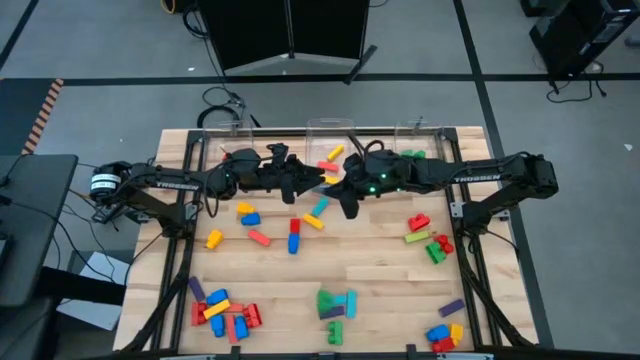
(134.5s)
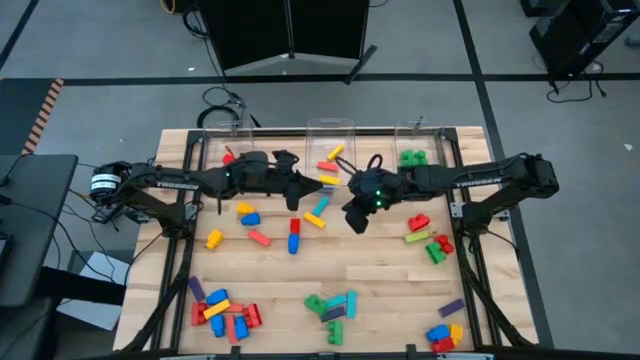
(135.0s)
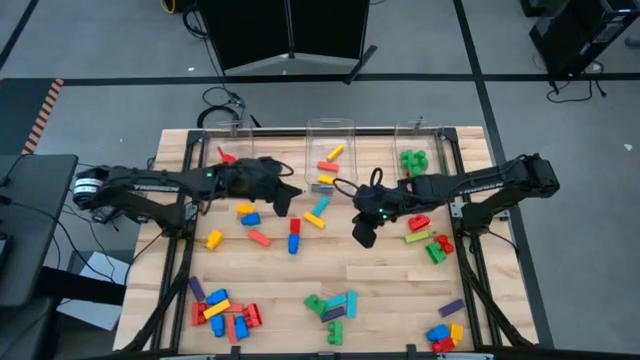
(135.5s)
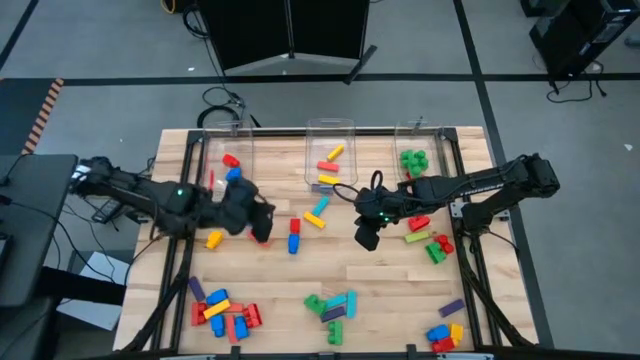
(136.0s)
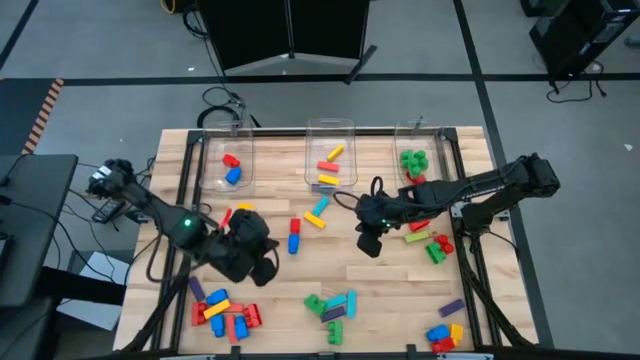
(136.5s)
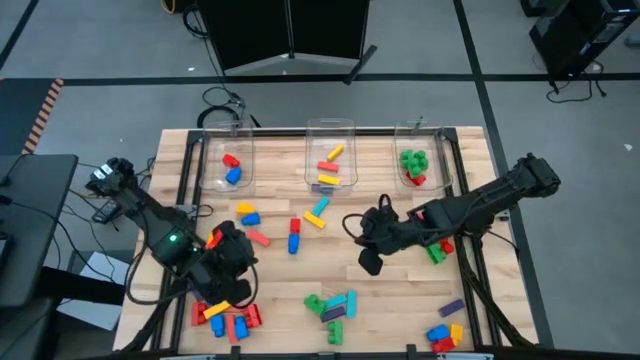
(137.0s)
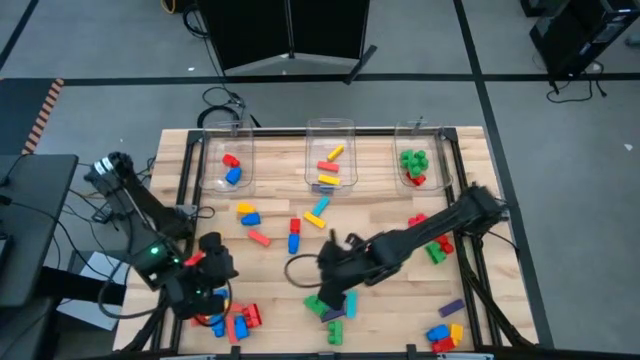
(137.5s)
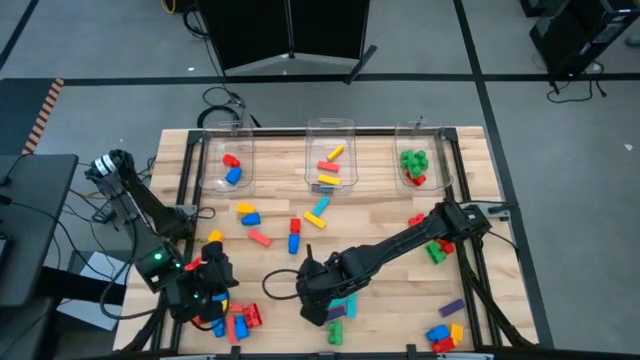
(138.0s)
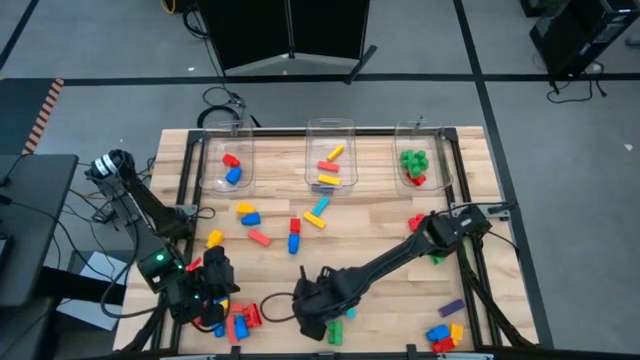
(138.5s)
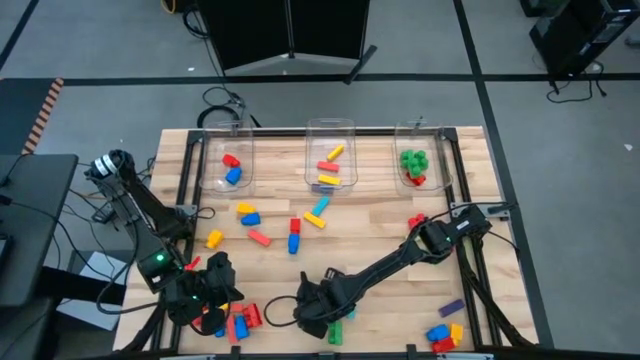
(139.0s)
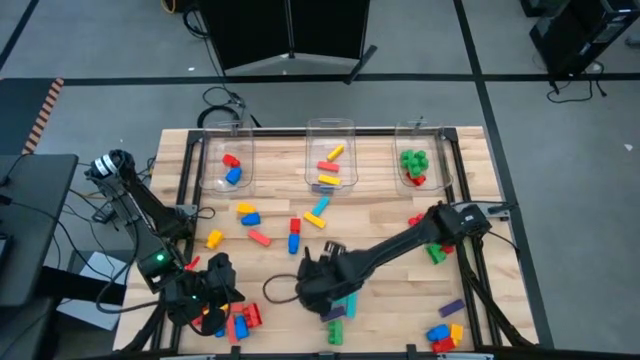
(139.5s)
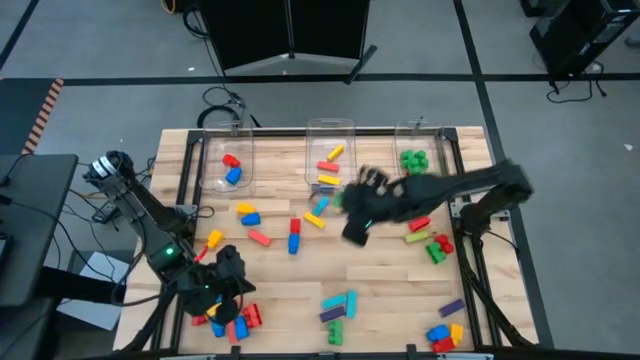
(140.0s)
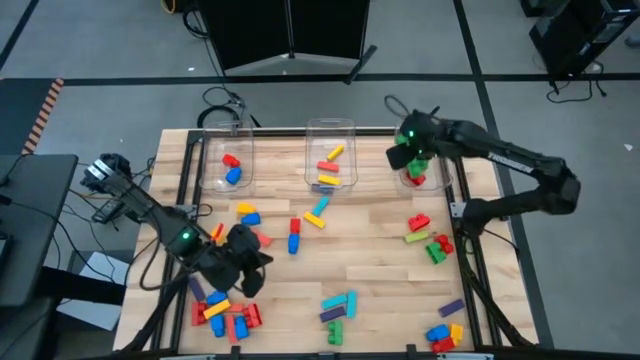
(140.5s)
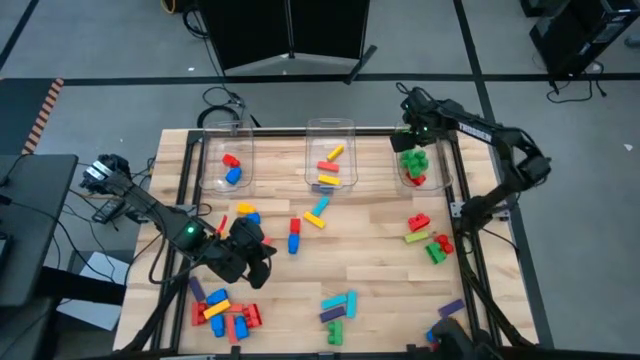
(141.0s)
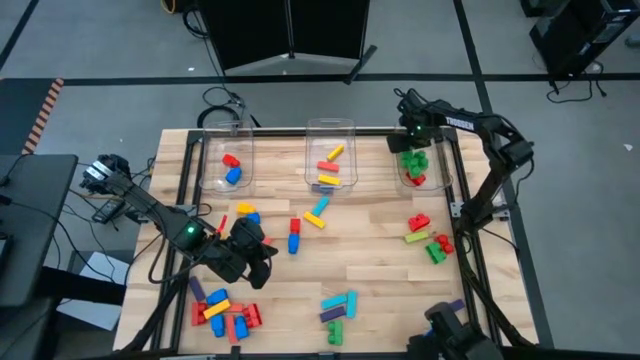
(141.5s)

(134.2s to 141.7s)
Task: Sort blocks by size
Put the green 2 stud game piece into the right transparent bin

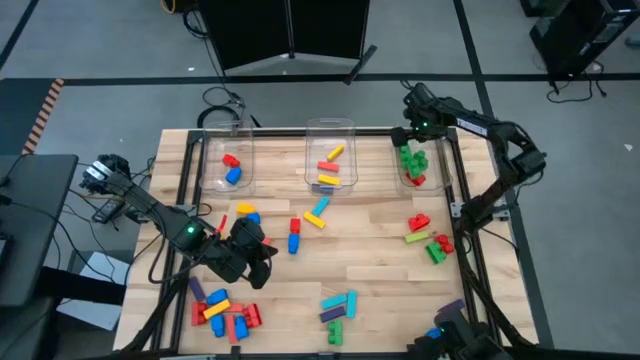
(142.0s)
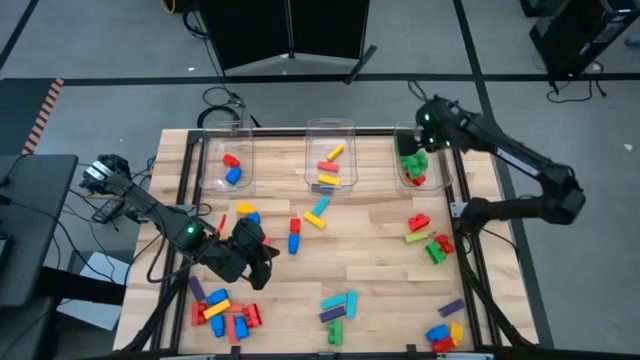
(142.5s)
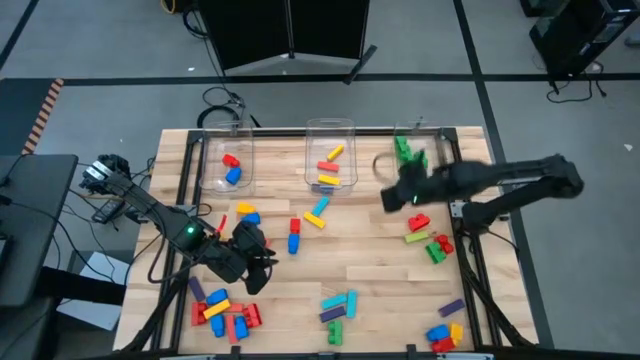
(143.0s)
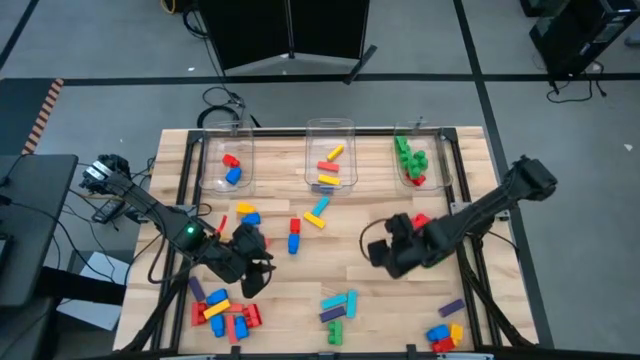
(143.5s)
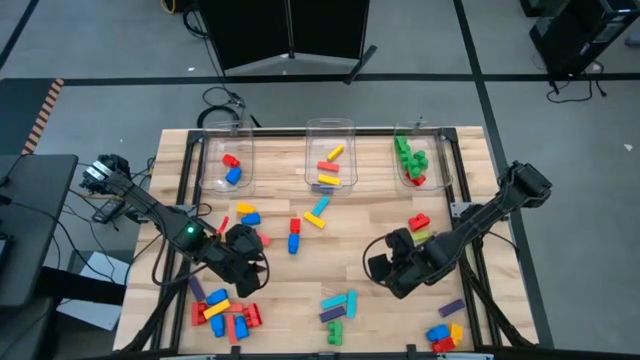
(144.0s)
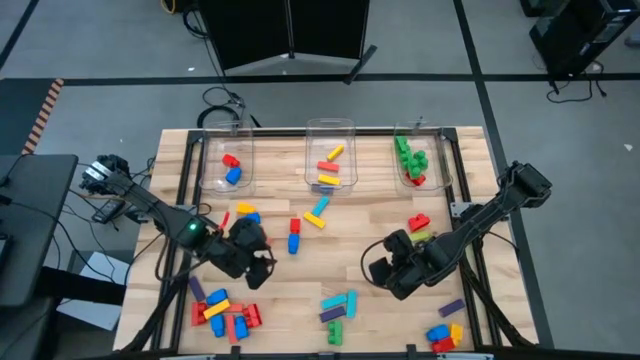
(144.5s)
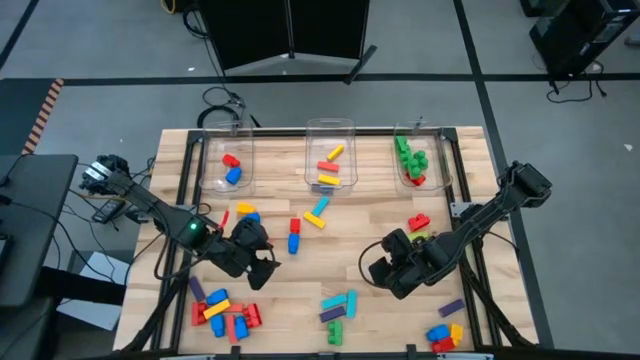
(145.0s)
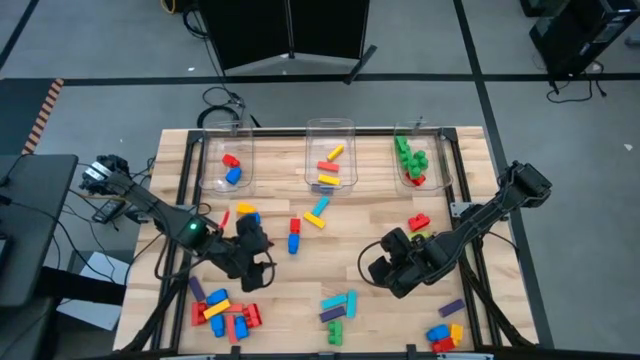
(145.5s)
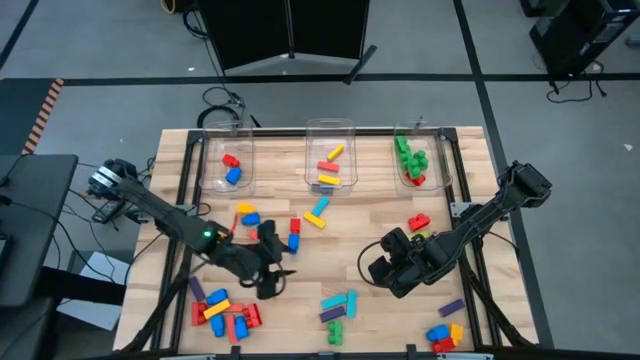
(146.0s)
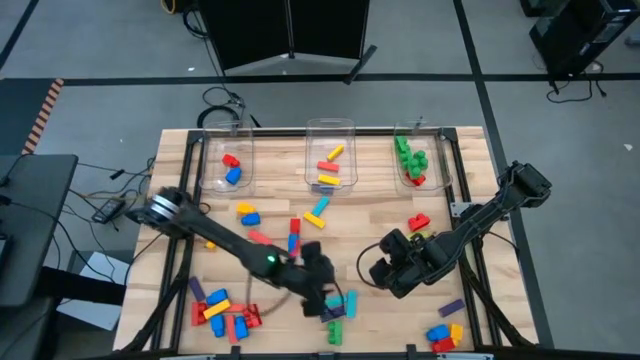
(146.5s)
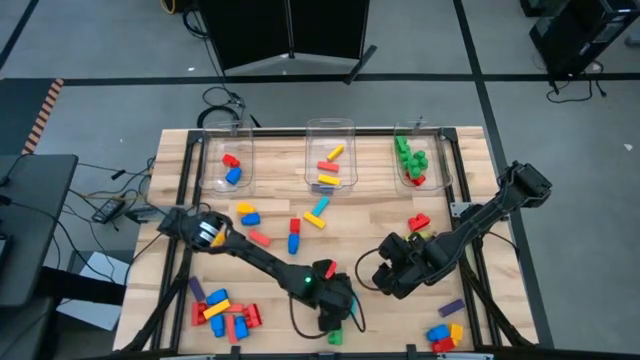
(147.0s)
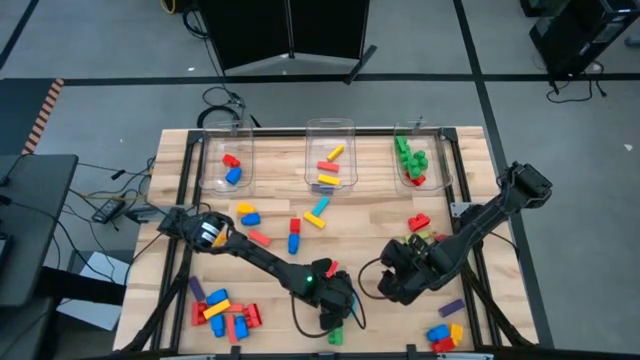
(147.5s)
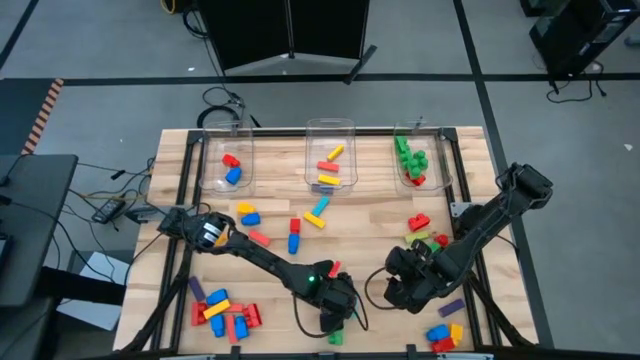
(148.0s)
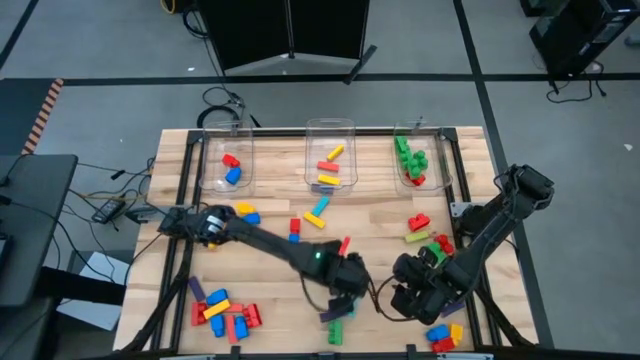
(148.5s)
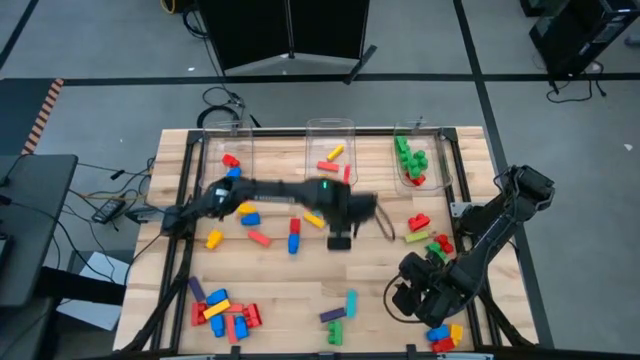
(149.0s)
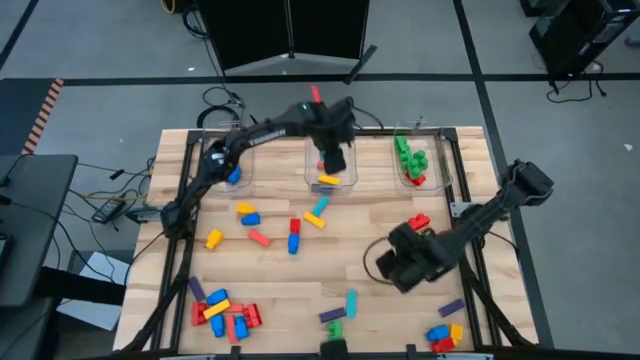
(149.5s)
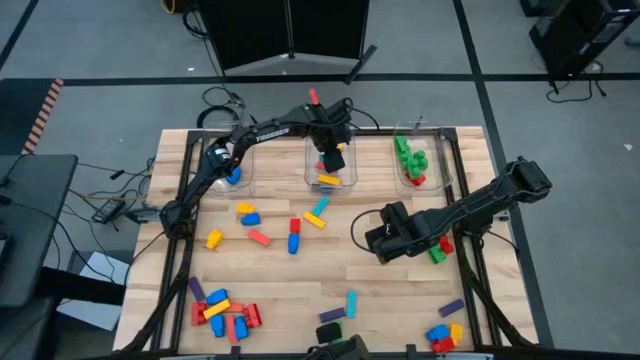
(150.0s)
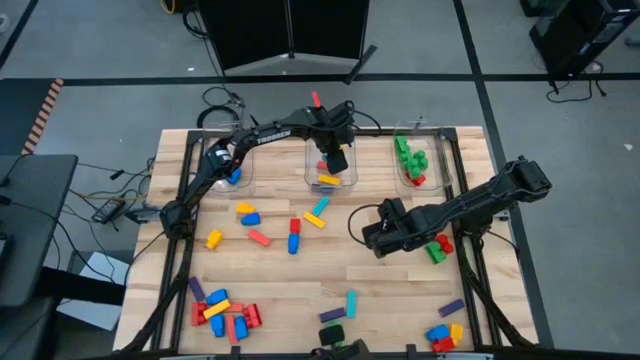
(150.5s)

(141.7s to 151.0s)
Put the blue block into the middle transparent bin

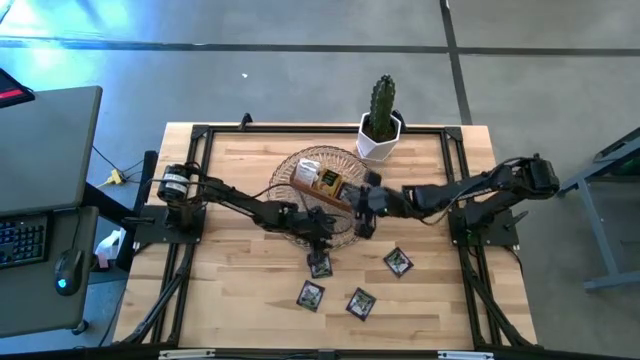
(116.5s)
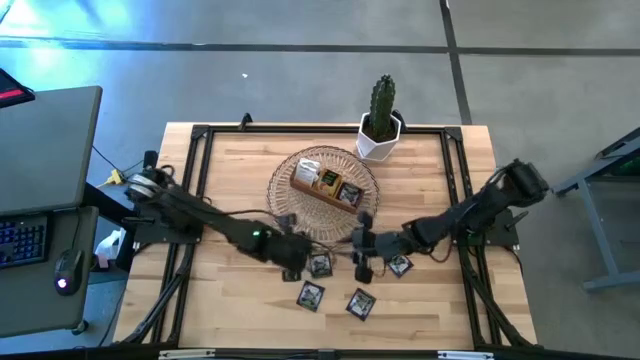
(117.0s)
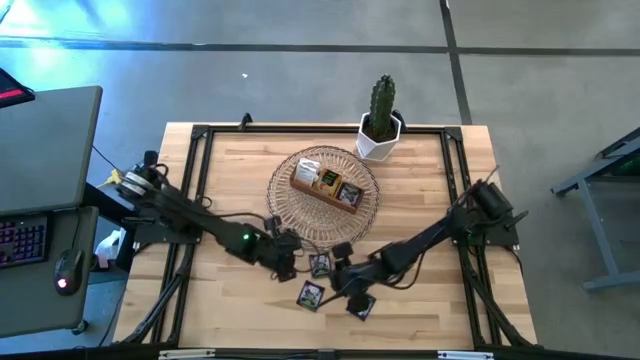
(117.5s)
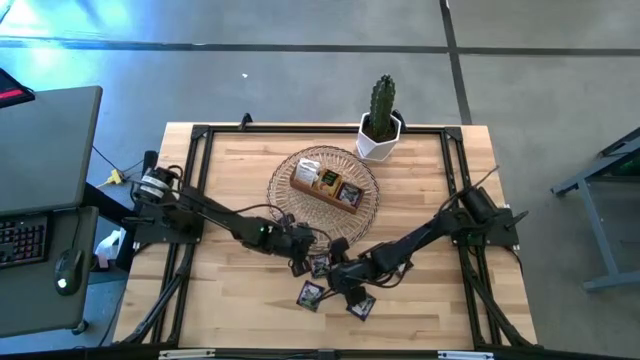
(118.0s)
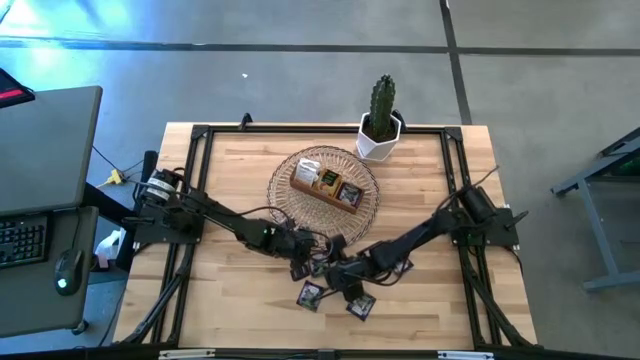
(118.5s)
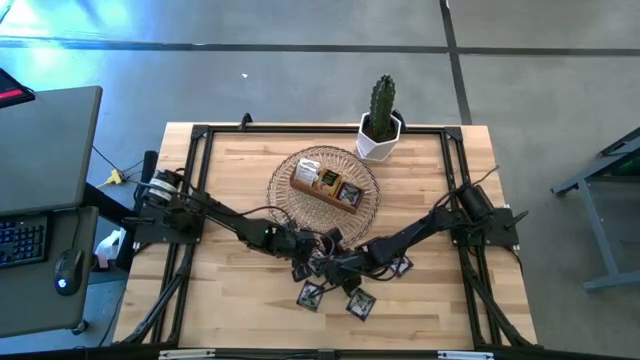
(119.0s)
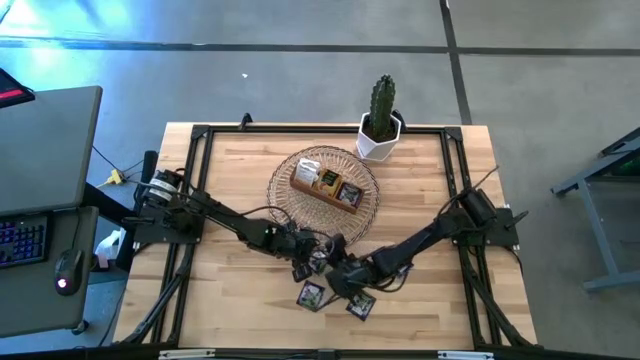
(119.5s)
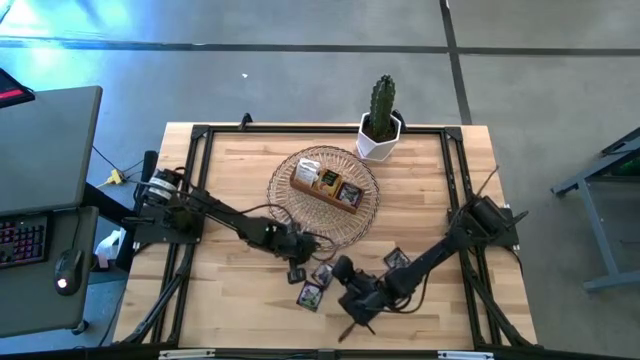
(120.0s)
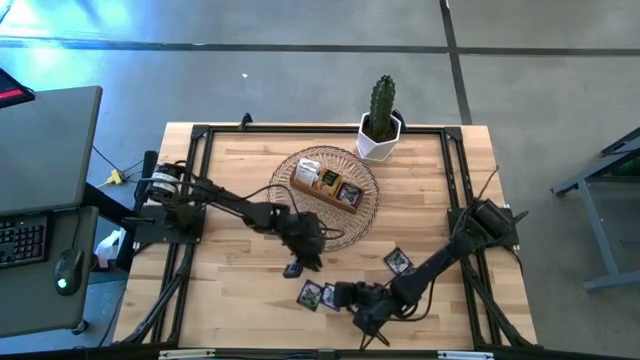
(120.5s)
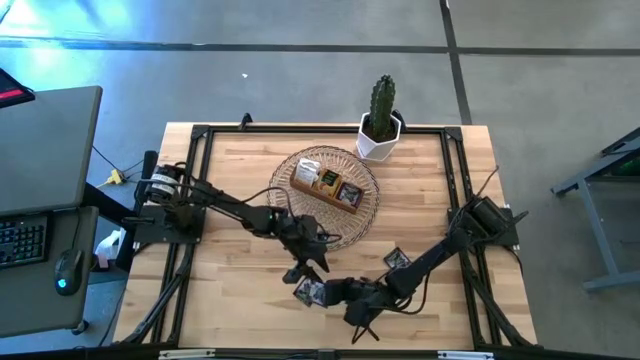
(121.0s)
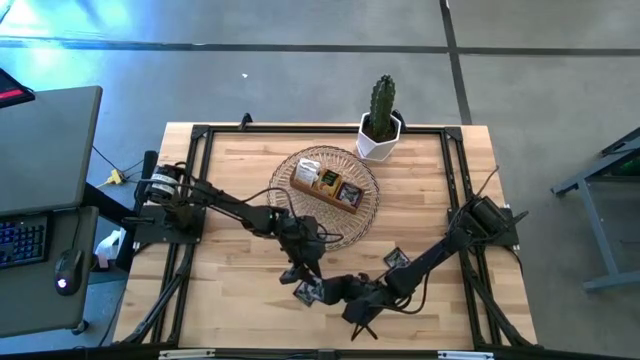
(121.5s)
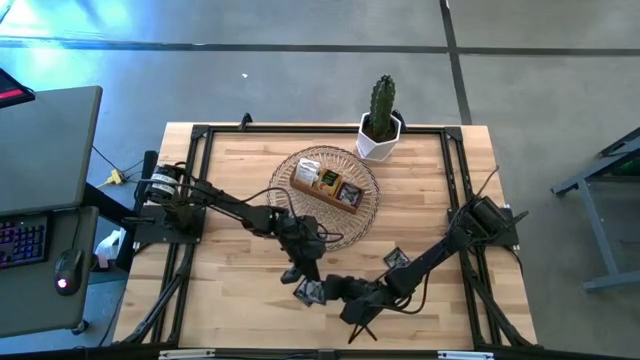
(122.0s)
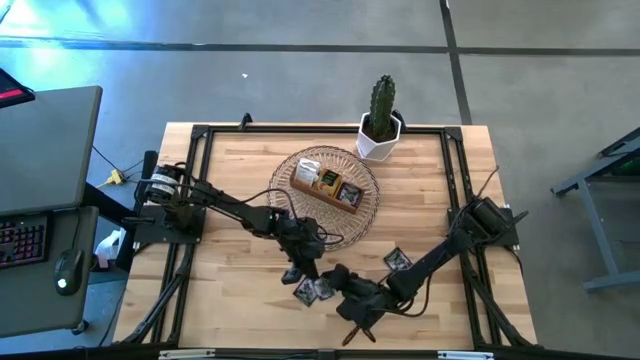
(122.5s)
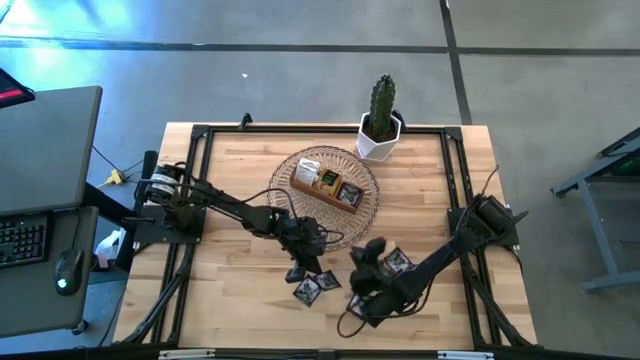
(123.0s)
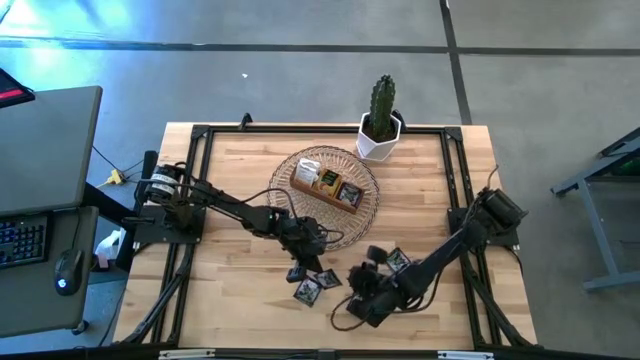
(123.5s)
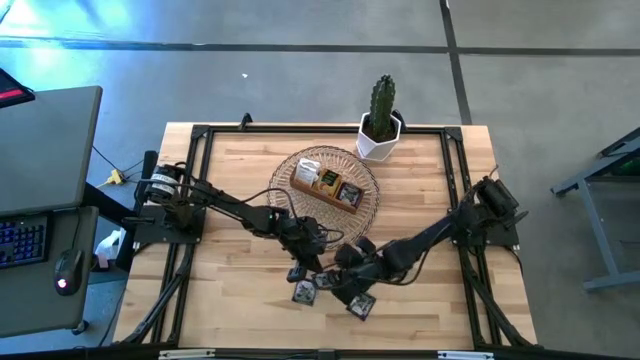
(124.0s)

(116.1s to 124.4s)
Task: Pick & Place Tea
Put the purple tea pack into the right section of the wooden organizer
